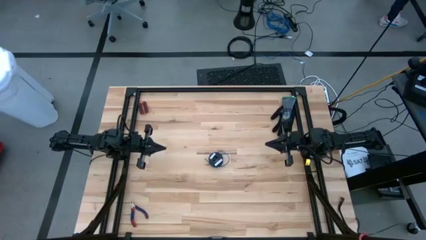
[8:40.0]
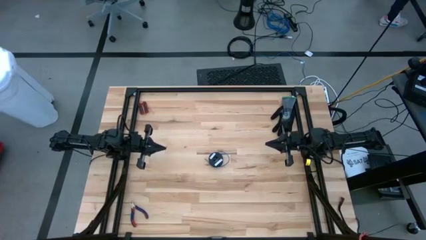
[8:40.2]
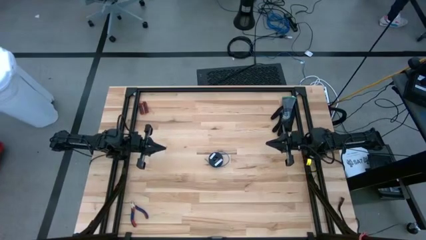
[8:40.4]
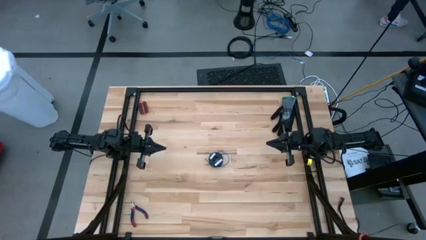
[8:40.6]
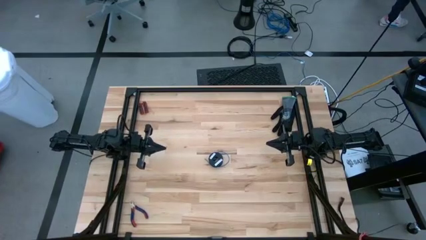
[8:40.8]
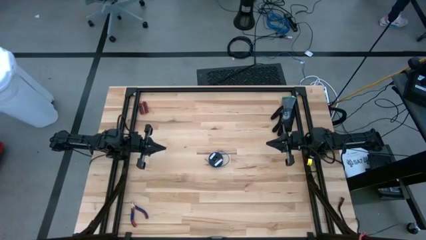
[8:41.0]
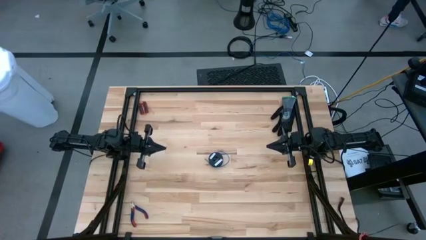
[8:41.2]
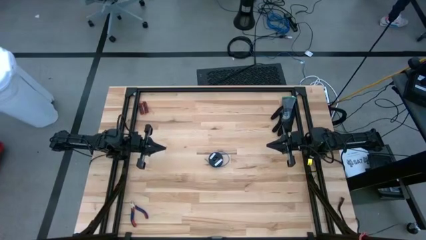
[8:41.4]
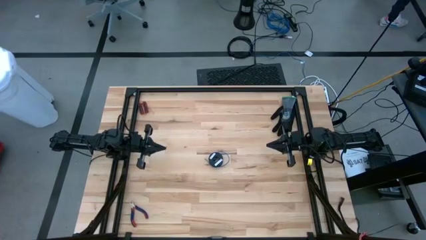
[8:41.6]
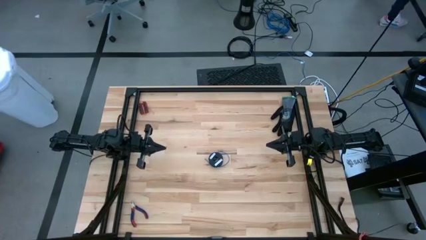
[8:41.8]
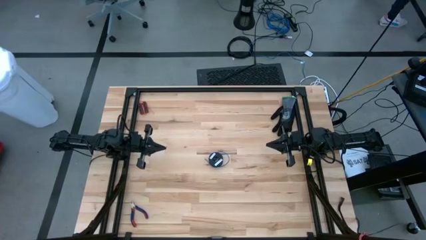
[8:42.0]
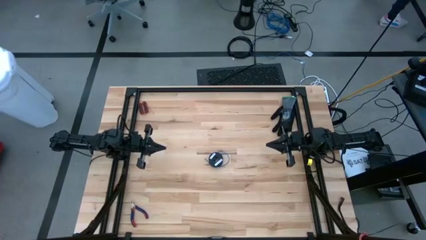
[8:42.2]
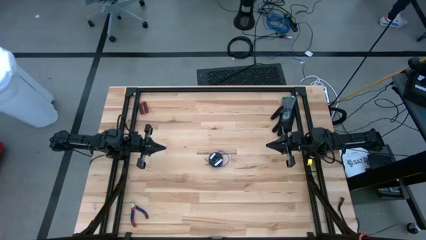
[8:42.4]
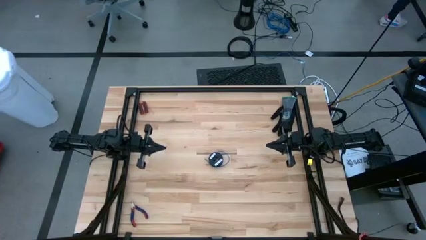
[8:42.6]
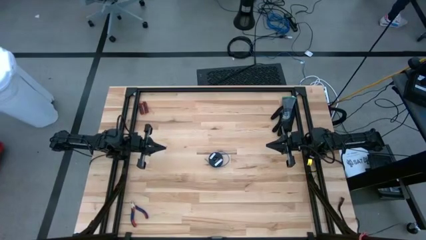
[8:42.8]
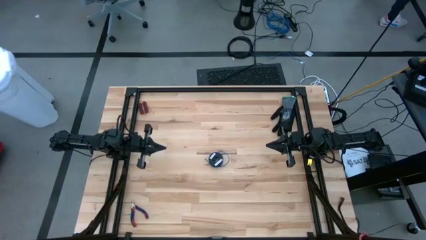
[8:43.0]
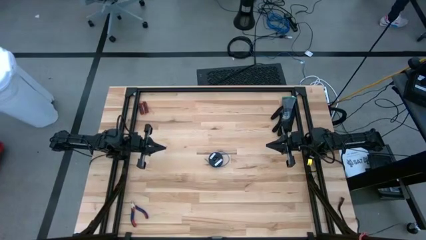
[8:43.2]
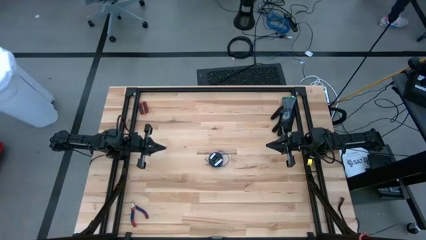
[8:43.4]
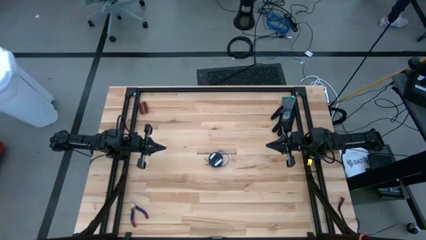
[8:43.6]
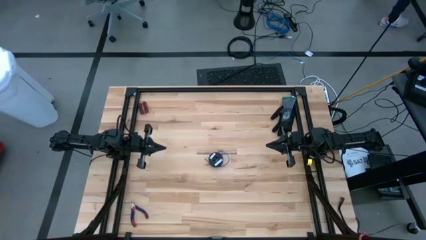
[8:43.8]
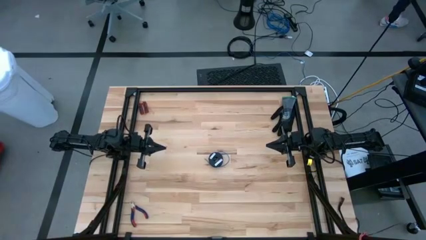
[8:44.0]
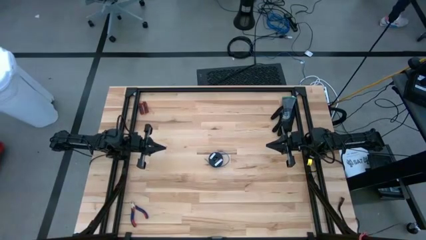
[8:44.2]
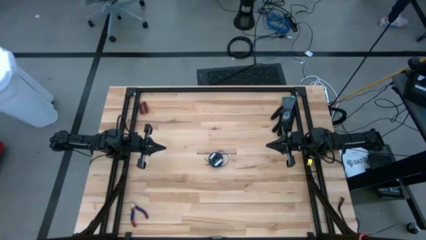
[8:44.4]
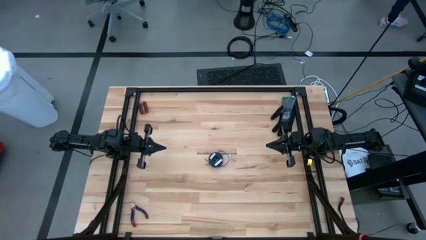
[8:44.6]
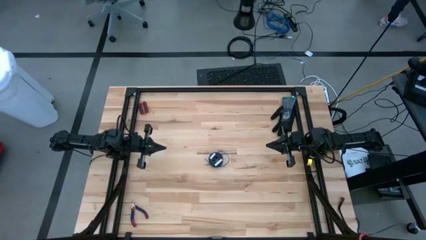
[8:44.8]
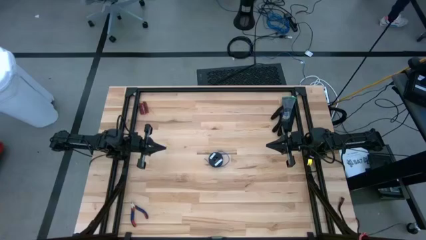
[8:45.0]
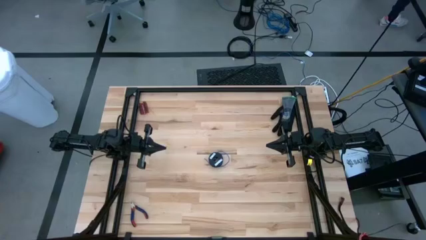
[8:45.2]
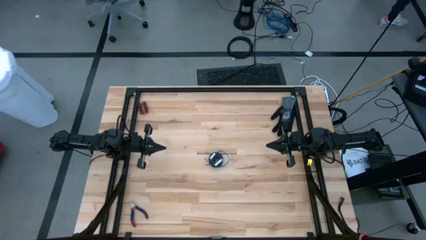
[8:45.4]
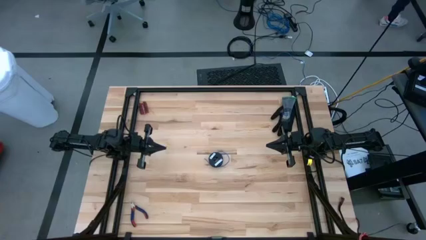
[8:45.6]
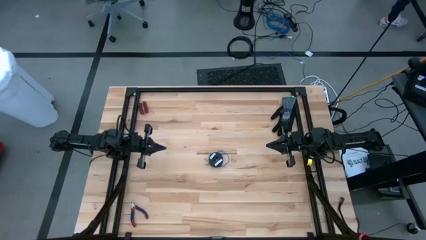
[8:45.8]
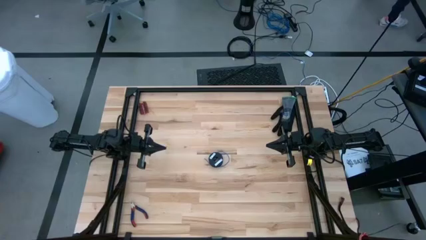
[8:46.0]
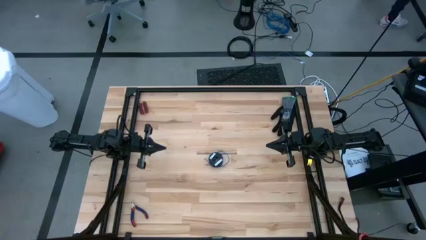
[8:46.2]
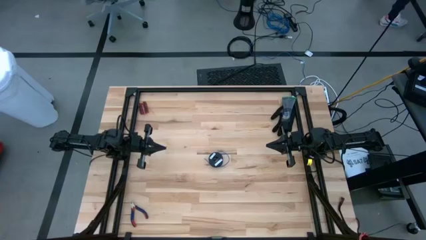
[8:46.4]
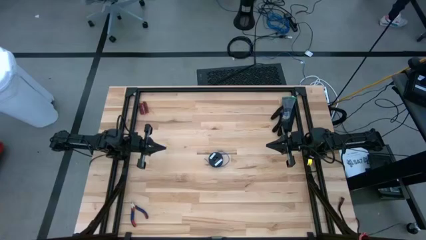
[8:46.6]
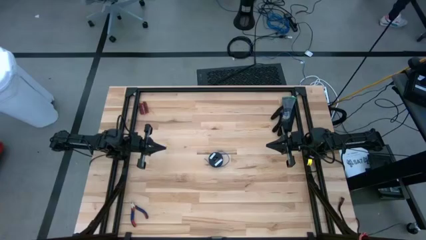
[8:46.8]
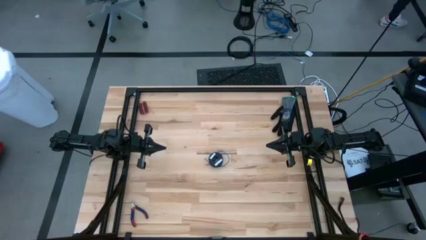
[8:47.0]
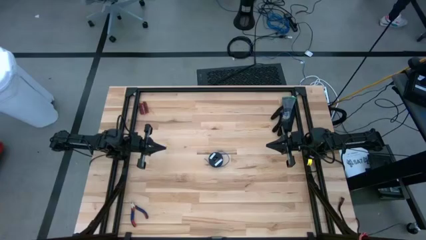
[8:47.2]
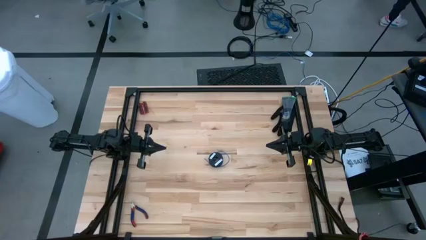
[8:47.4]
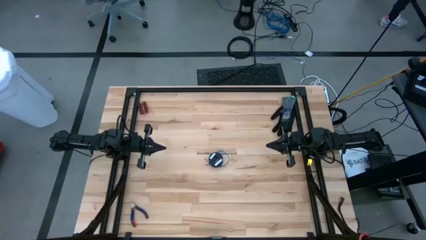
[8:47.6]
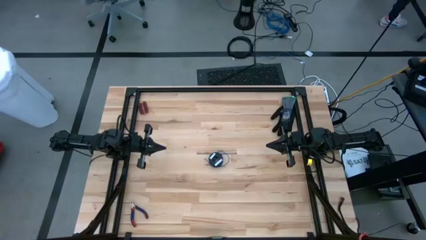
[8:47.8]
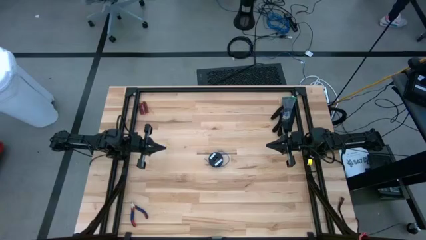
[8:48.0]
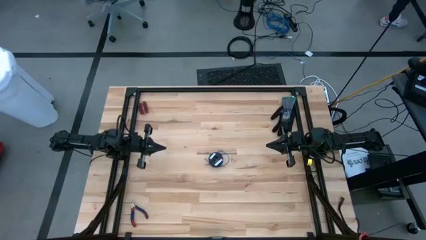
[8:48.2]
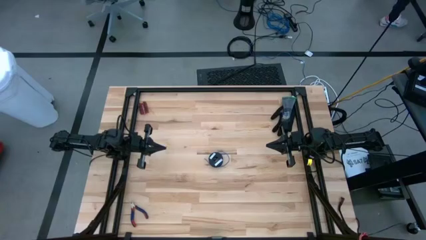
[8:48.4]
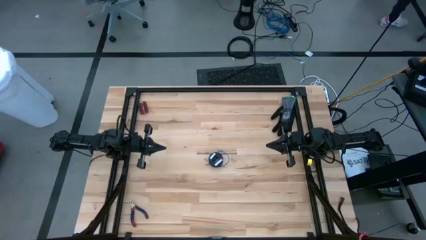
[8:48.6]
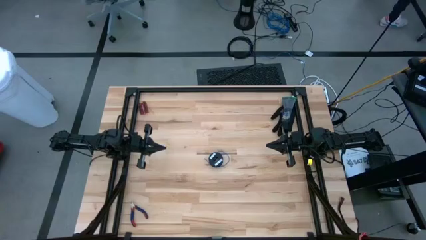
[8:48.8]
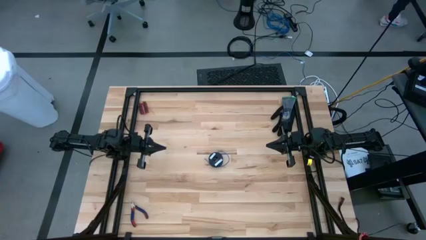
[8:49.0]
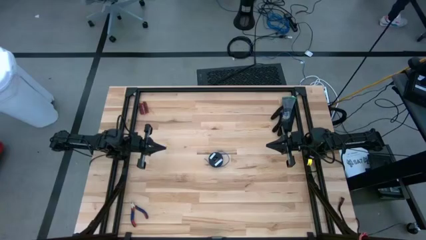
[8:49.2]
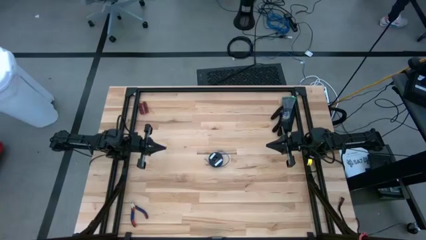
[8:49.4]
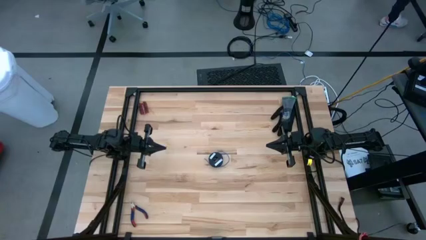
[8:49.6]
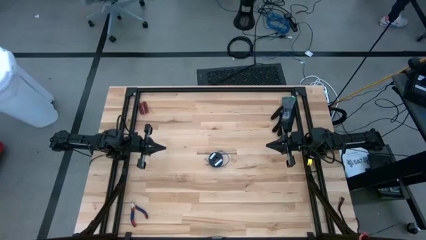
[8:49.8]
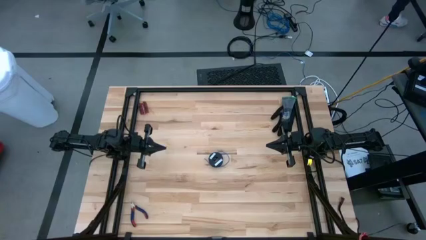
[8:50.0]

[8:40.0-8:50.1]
Task: Coil cords
Return to Home Position

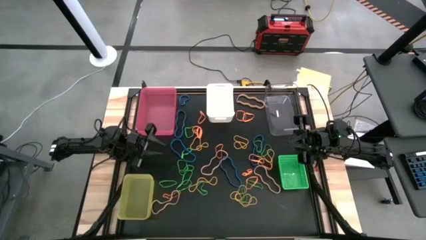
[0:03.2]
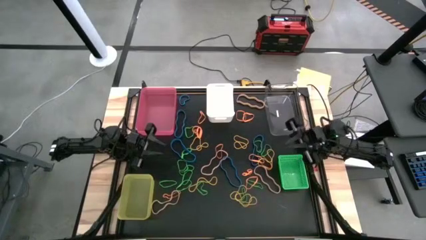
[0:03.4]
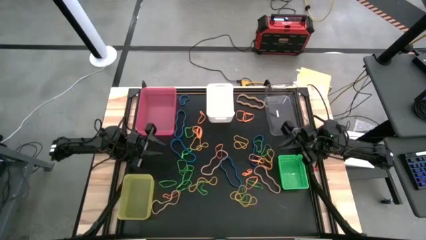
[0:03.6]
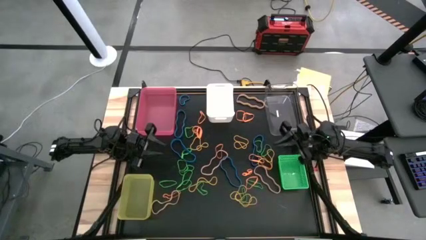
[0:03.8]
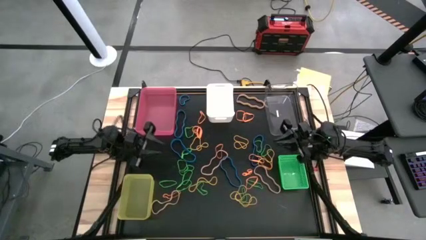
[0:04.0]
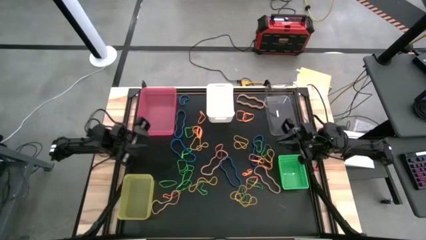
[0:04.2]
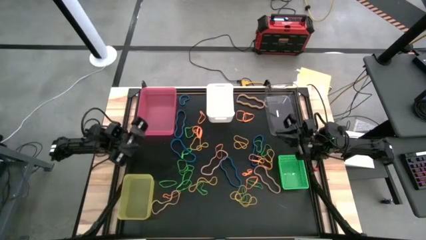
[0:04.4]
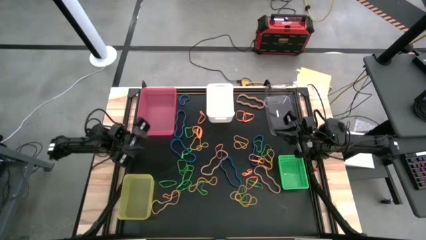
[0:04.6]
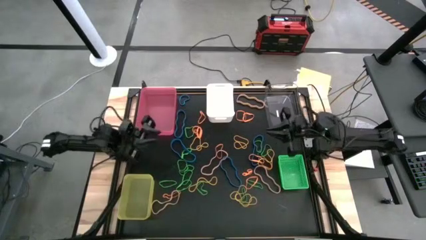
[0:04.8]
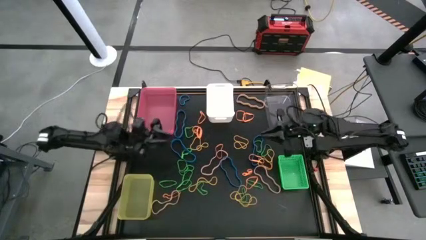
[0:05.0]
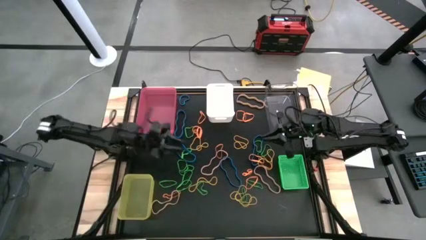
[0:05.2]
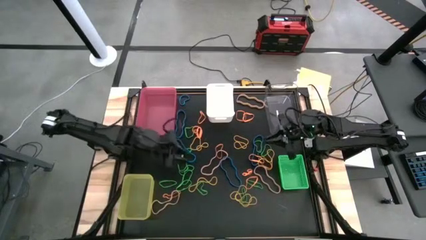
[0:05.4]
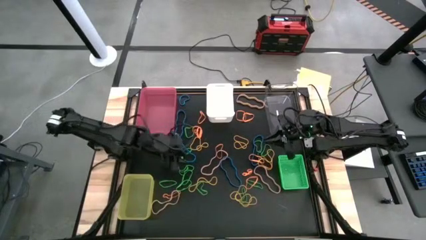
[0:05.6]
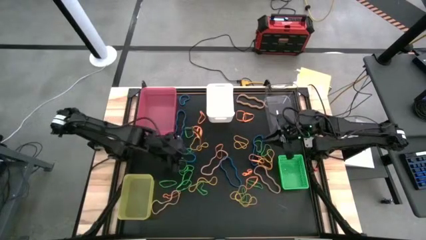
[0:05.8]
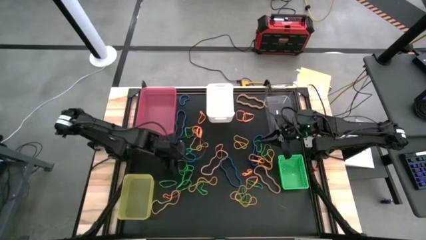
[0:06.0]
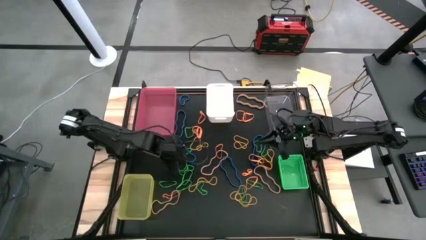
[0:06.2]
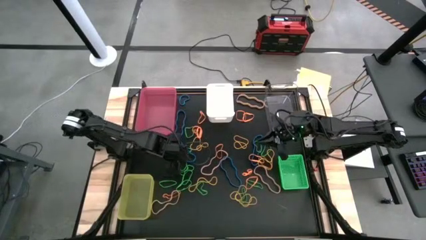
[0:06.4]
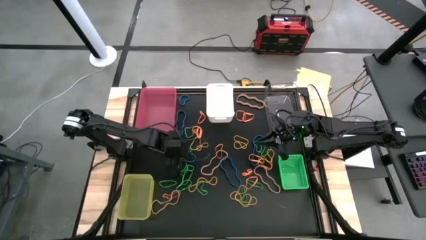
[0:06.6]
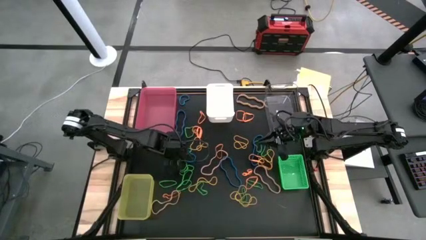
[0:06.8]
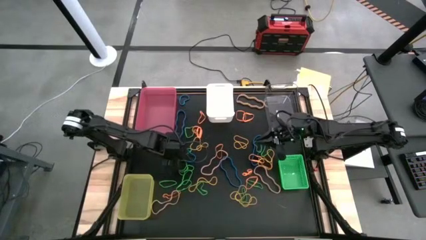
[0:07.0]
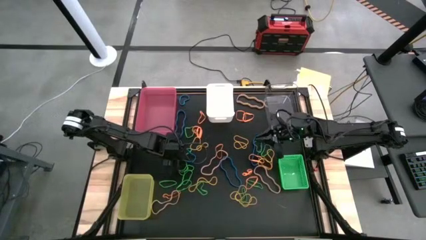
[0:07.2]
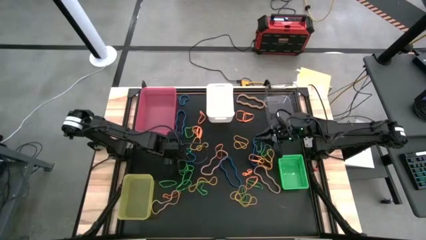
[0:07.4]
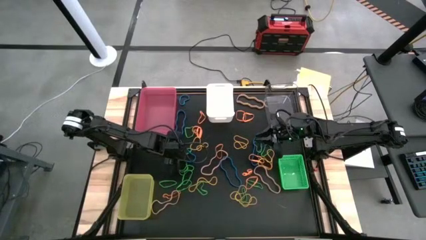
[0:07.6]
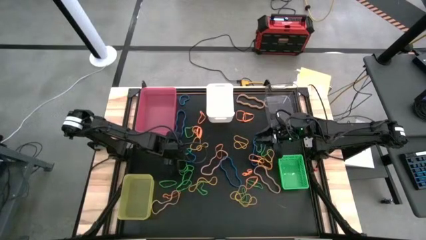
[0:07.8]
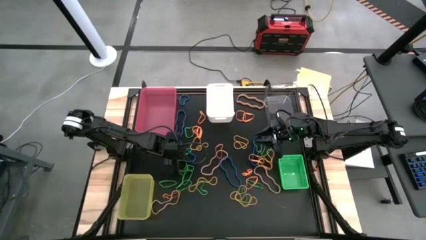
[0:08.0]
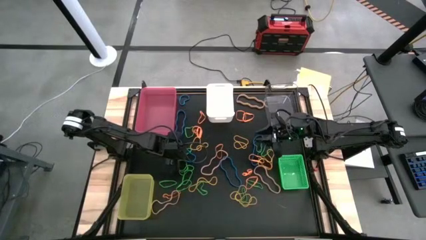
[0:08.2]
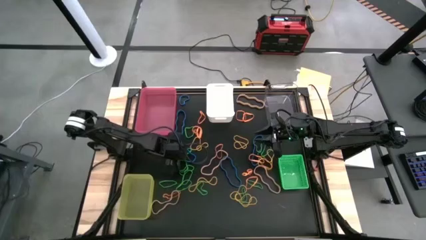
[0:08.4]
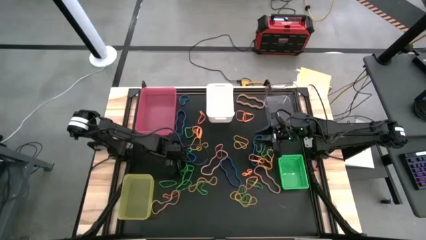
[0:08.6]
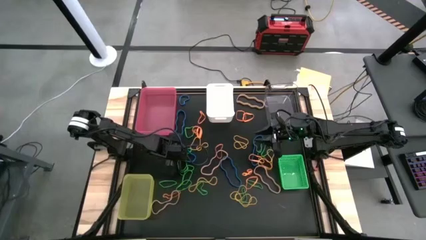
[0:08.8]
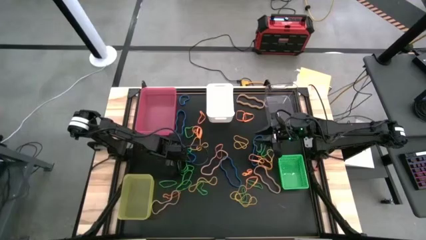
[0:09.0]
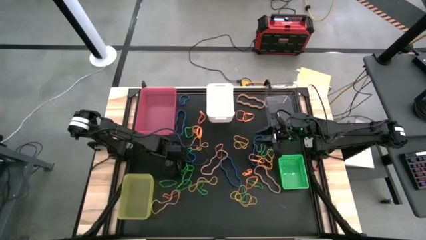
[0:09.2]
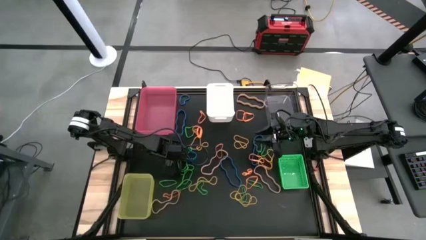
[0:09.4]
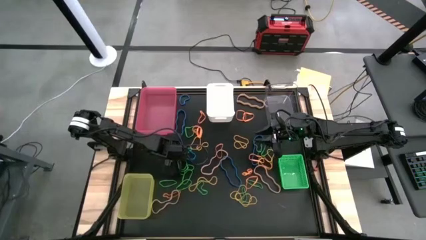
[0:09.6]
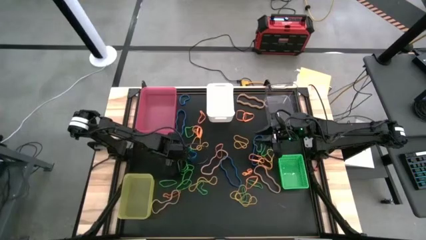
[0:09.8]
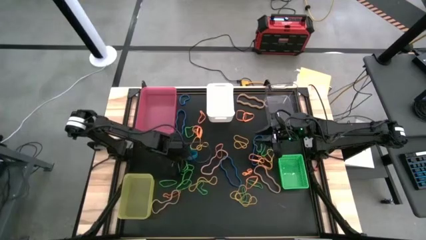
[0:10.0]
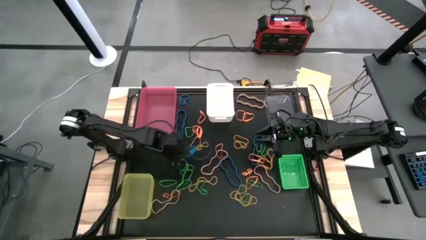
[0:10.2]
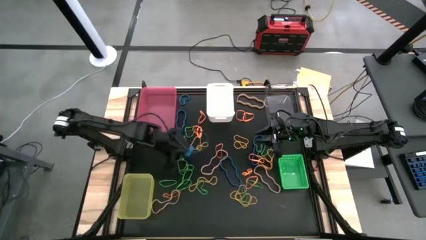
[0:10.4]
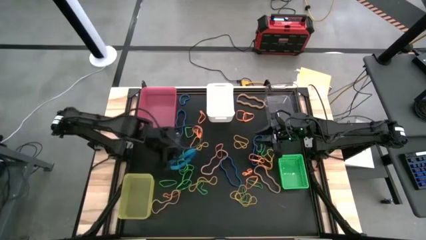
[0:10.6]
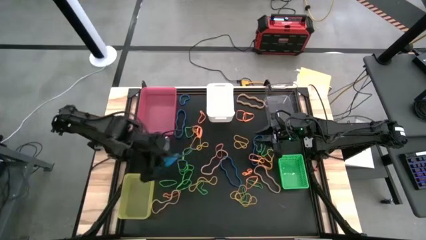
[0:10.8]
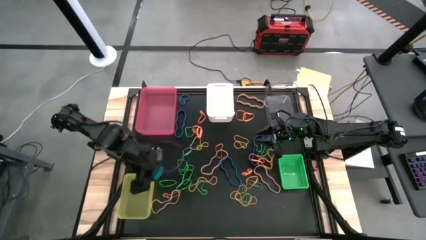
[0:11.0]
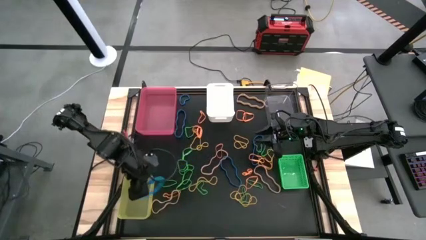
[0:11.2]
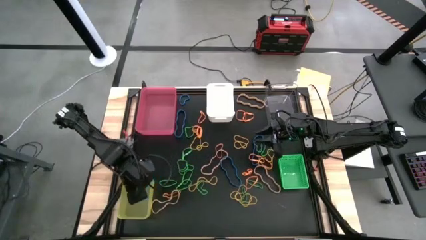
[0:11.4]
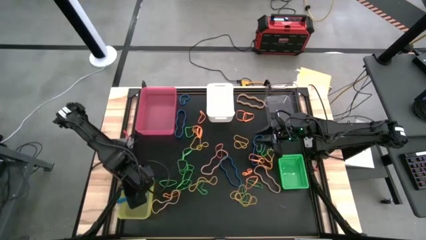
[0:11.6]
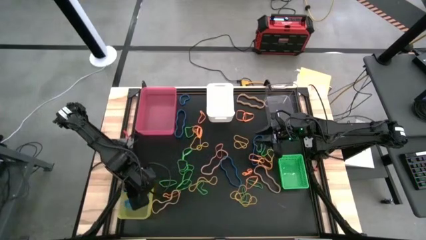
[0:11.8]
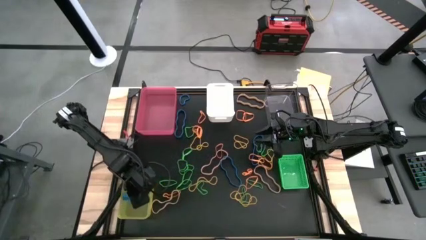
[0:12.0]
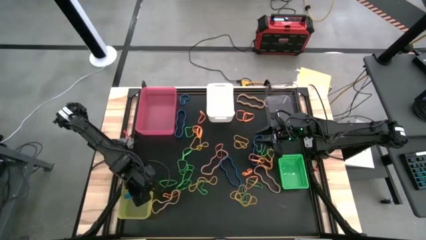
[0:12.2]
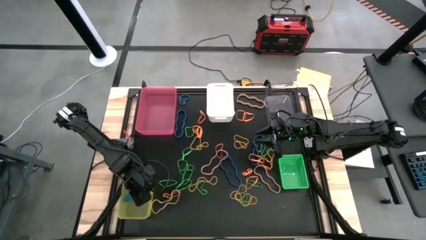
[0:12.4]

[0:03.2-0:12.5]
Task: Sort rubber bands into baskets
Put the blue rubber band into the left yellow bin
